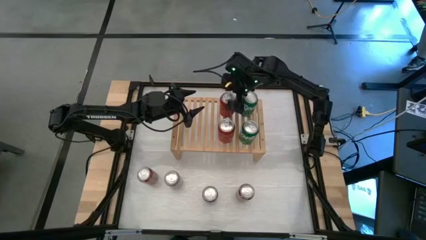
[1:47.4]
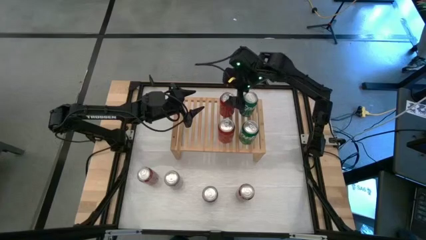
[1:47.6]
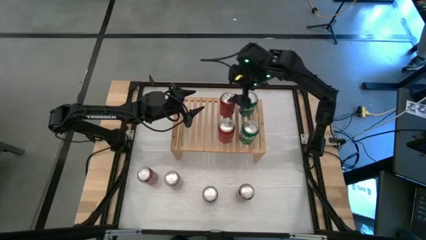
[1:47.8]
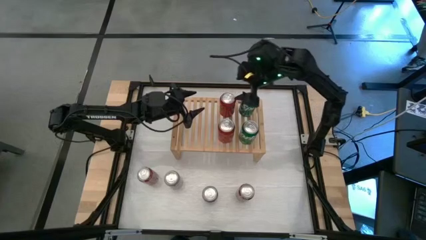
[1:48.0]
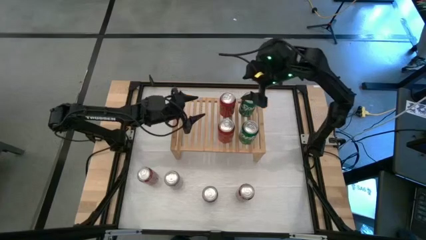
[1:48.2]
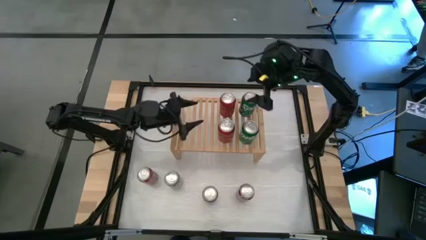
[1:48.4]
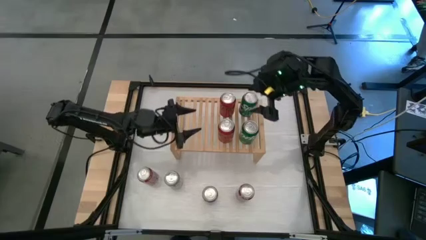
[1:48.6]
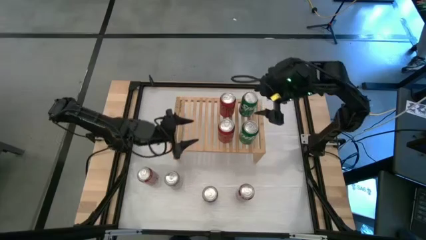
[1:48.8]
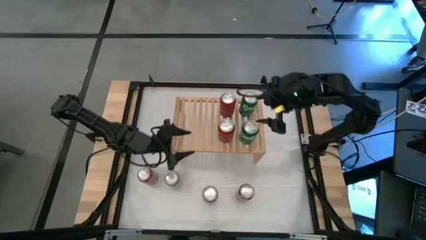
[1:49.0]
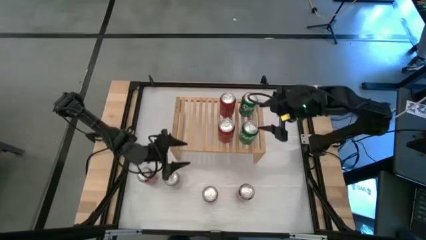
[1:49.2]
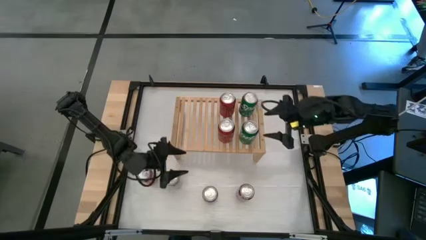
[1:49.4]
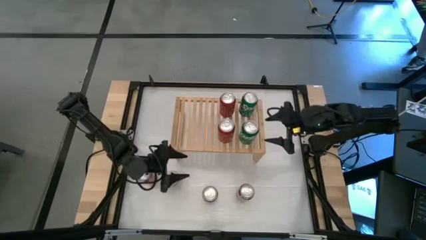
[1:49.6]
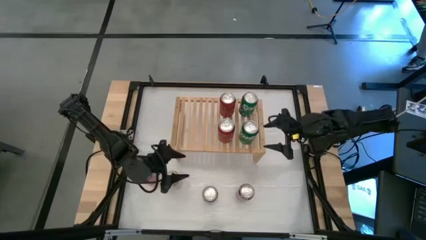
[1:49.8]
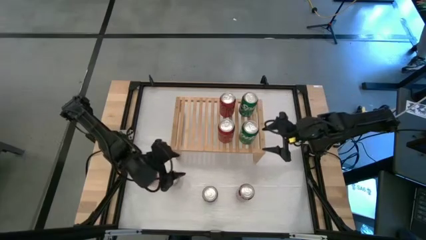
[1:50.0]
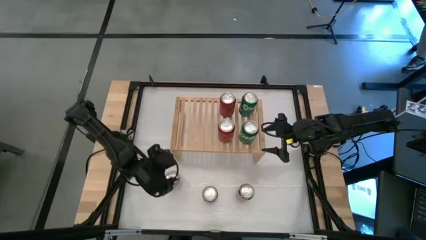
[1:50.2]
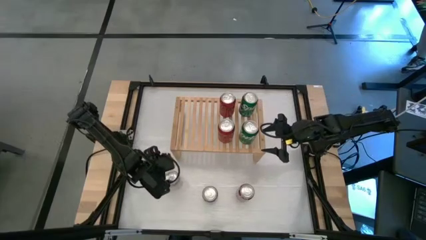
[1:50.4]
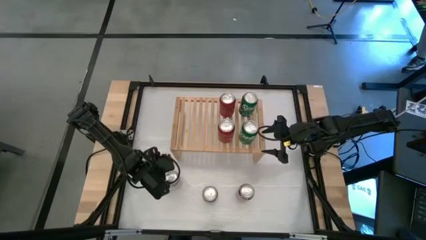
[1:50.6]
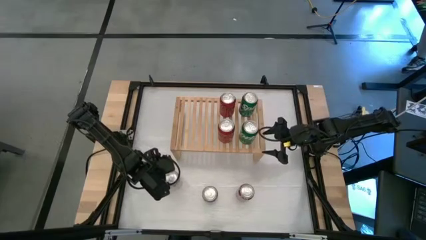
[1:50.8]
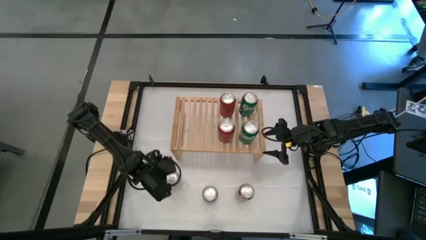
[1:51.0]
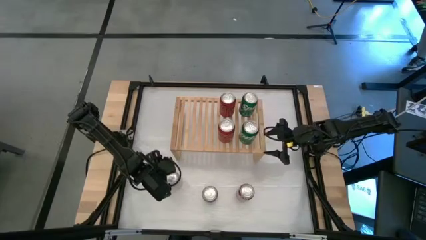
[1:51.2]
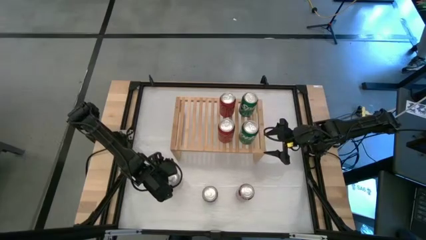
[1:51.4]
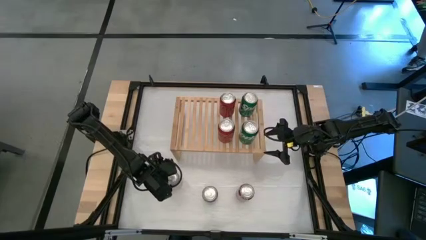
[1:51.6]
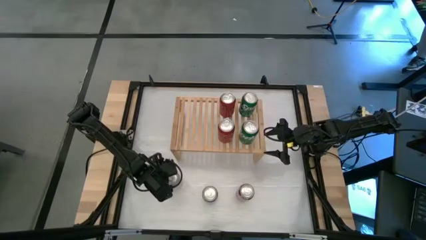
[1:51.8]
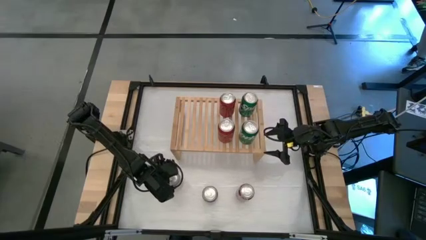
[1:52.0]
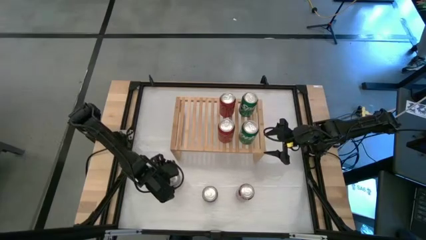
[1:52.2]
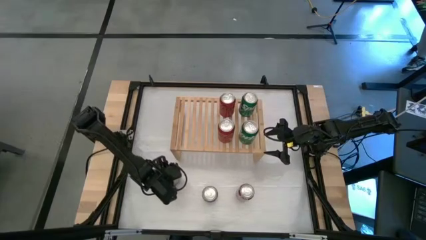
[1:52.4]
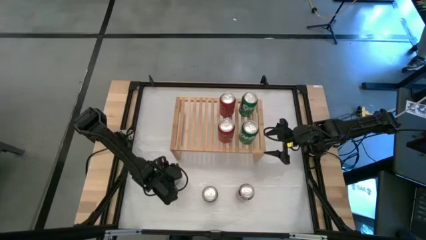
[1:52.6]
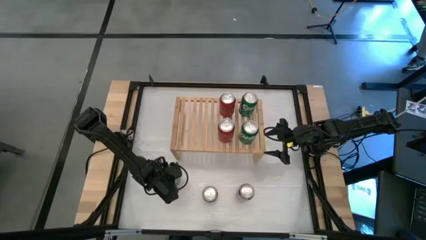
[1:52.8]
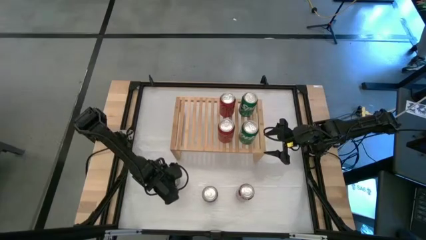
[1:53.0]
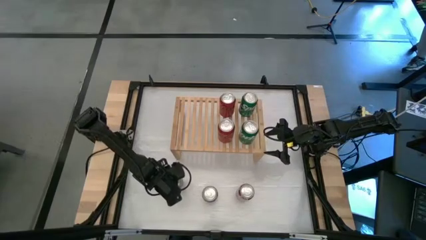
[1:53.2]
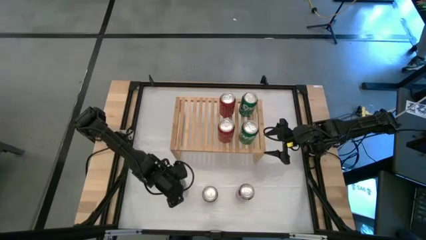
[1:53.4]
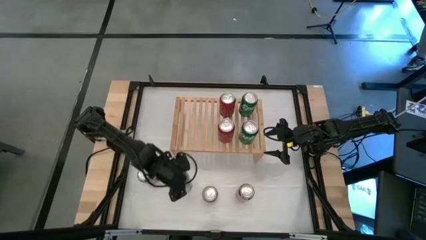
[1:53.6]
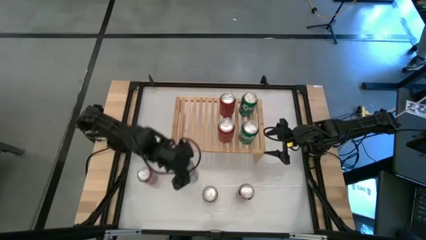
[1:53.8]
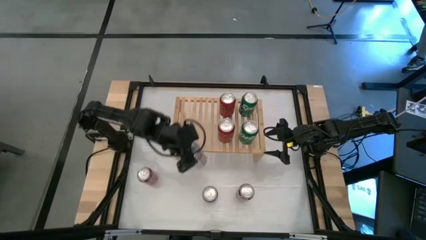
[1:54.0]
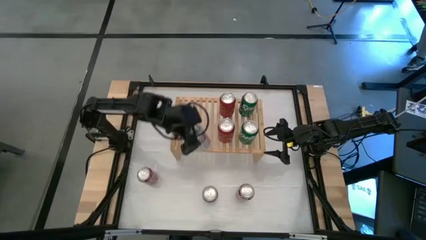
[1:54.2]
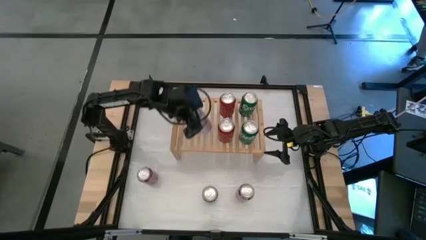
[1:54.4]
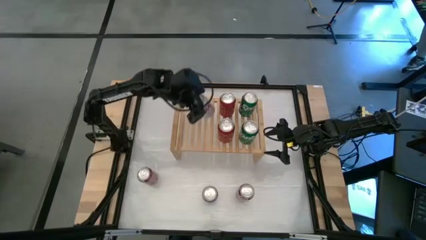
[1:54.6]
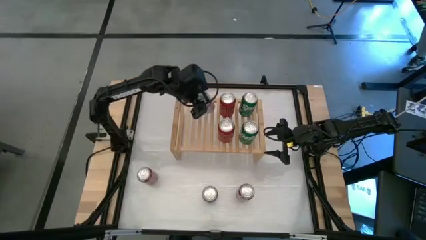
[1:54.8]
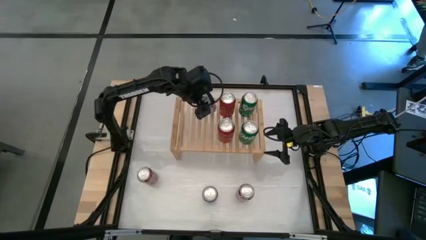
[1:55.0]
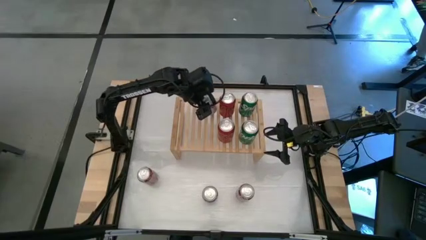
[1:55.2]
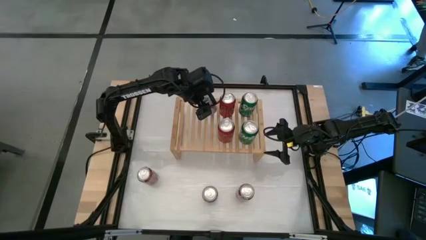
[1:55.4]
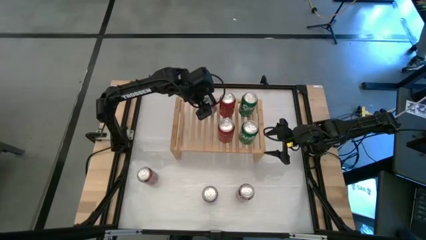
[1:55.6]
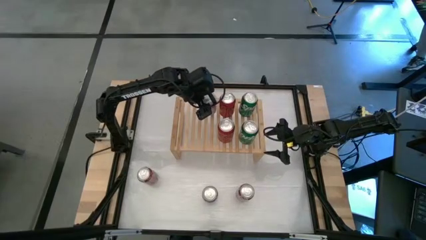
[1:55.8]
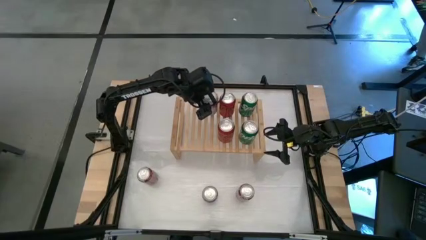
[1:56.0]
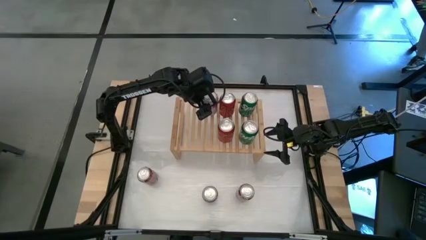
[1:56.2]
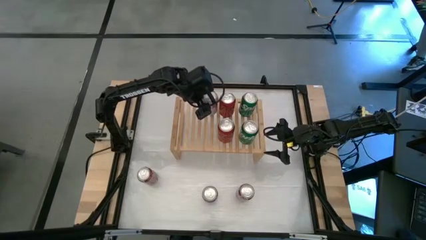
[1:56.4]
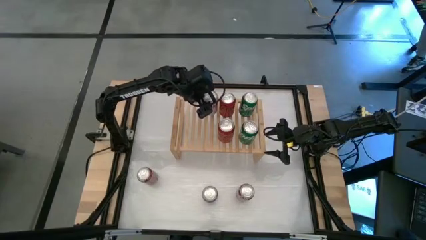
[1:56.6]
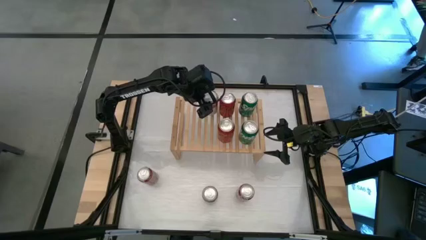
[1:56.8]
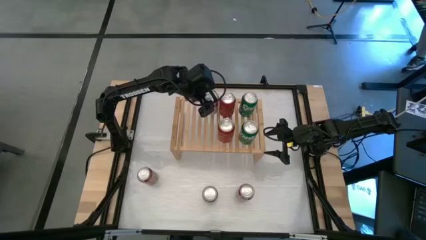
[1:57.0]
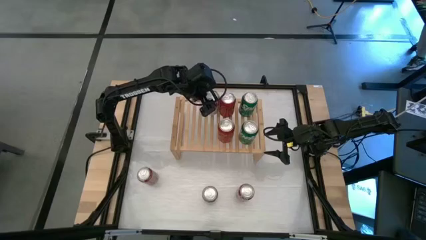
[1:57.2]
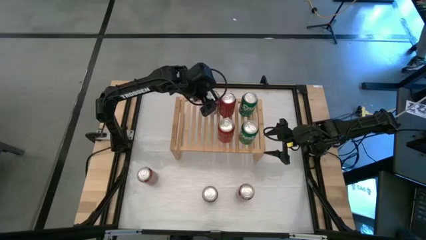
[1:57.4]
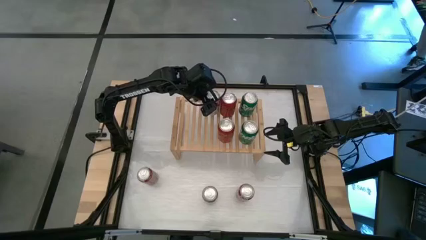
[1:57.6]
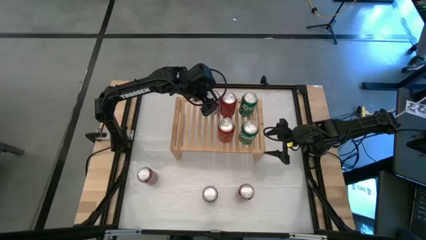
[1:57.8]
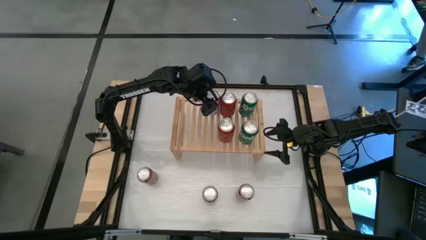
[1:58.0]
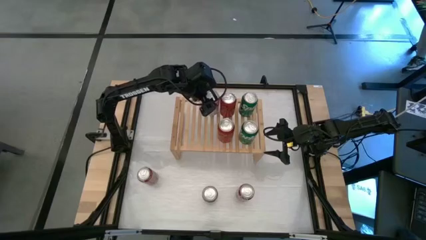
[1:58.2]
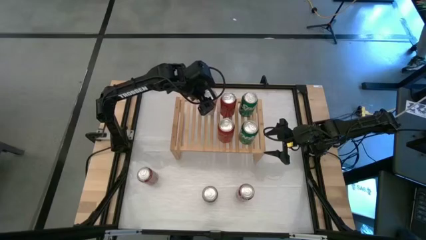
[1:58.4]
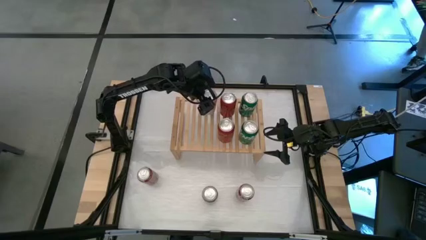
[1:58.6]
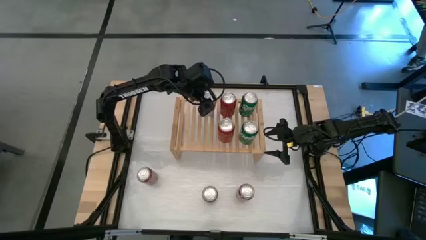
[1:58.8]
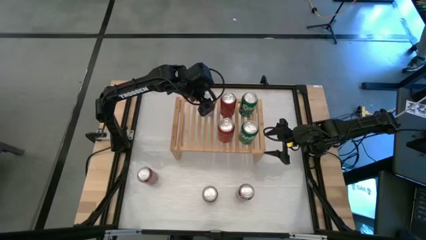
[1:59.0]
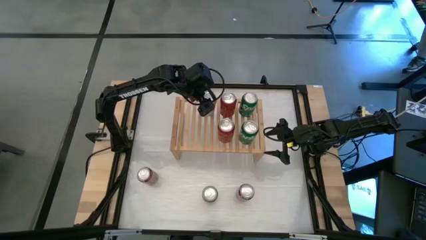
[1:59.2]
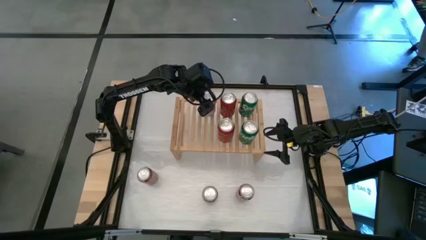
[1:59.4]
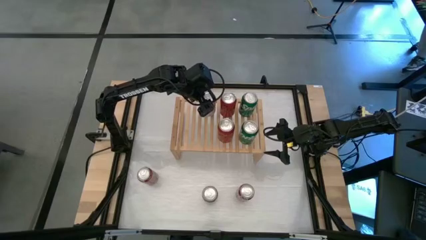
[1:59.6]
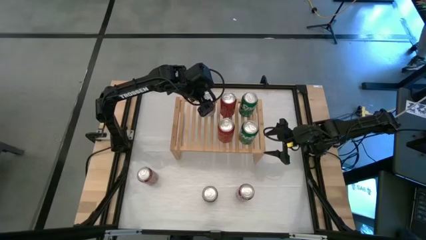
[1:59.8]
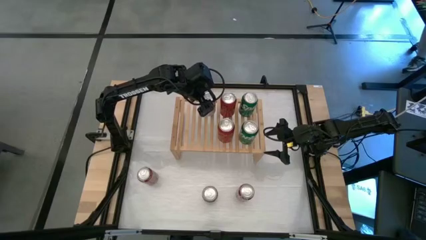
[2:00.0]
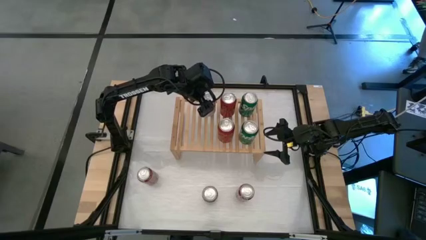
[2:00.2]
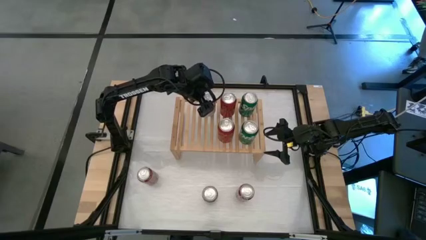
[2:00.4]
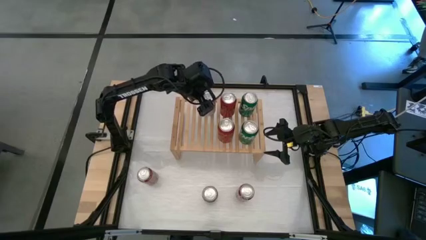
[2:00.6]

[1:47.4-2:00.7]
Task: Place canned beverage on shelf
Put the left silver soda can on the shelf
